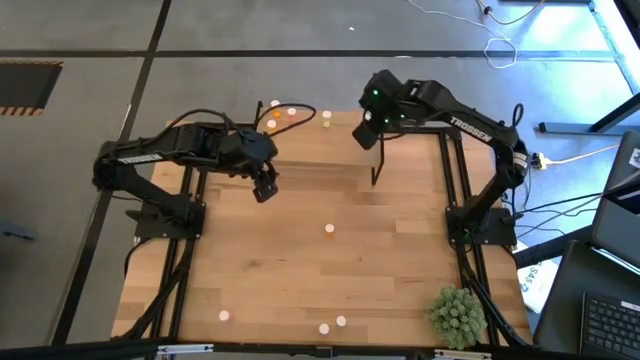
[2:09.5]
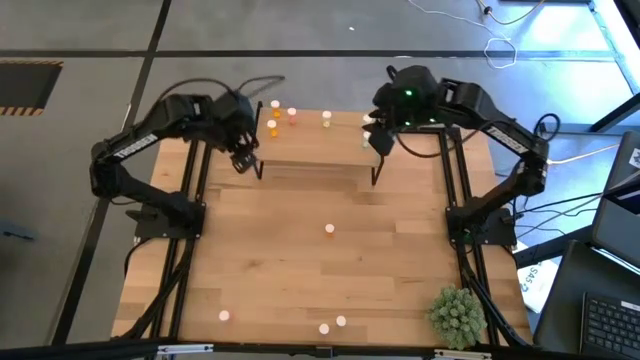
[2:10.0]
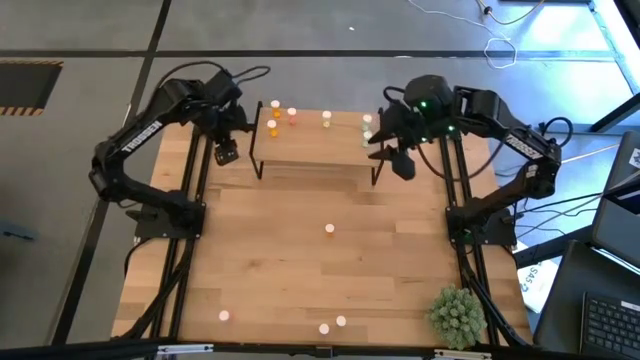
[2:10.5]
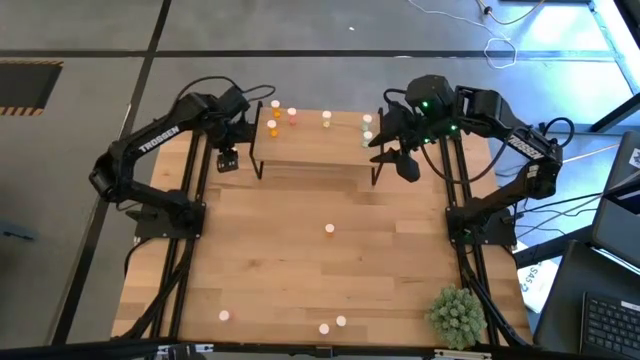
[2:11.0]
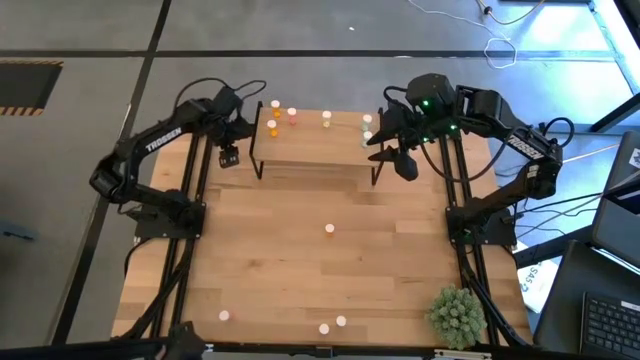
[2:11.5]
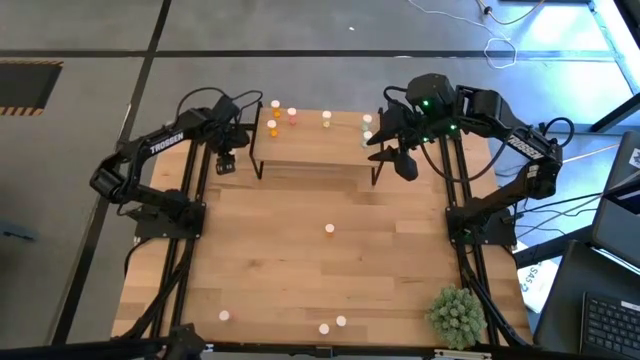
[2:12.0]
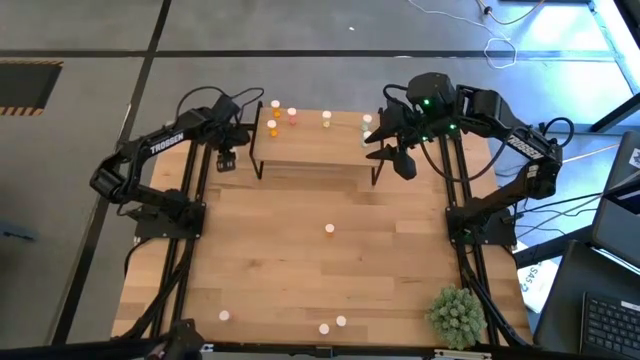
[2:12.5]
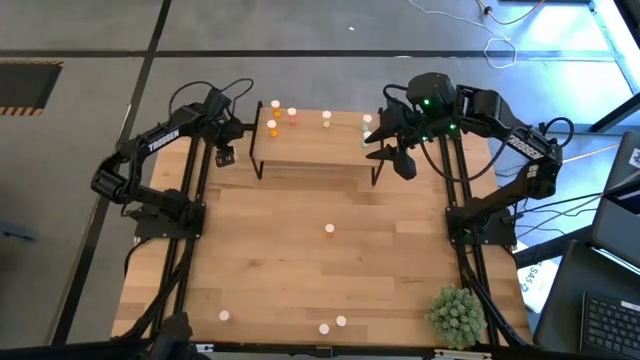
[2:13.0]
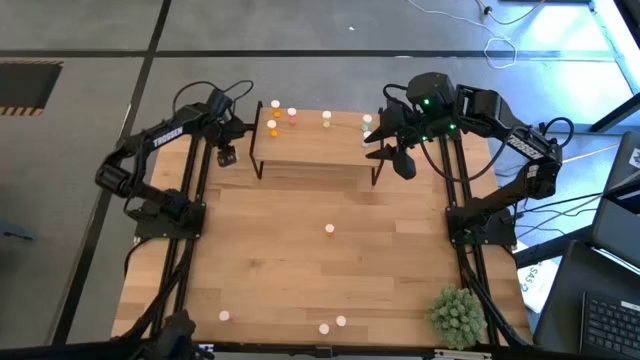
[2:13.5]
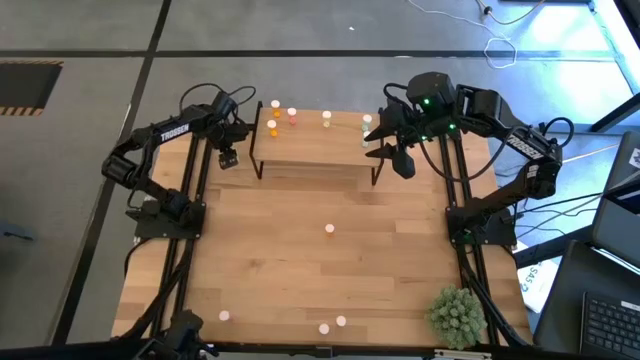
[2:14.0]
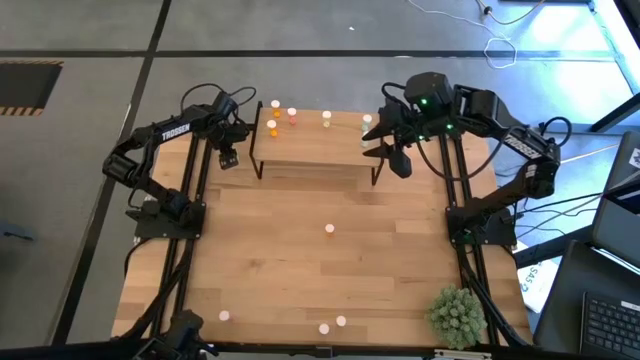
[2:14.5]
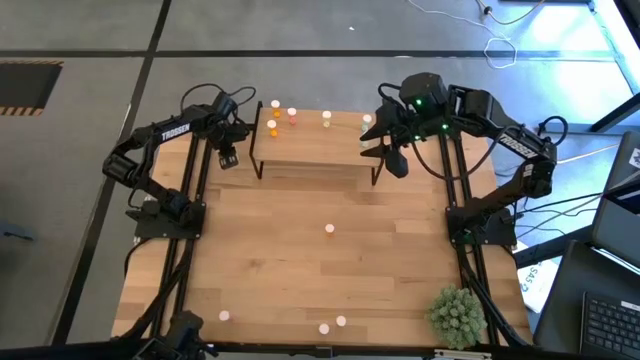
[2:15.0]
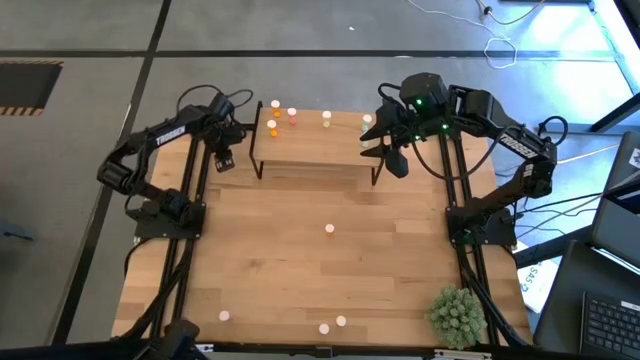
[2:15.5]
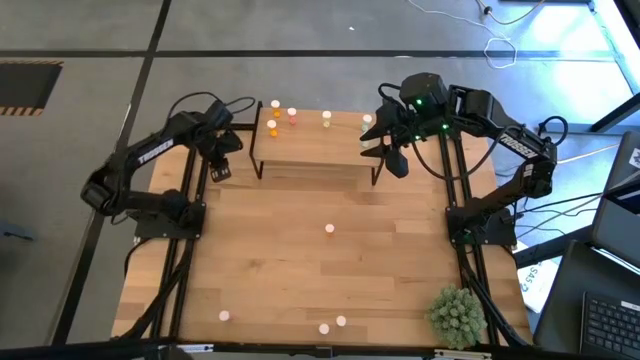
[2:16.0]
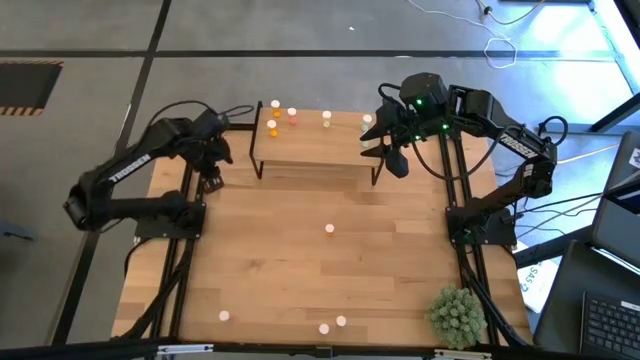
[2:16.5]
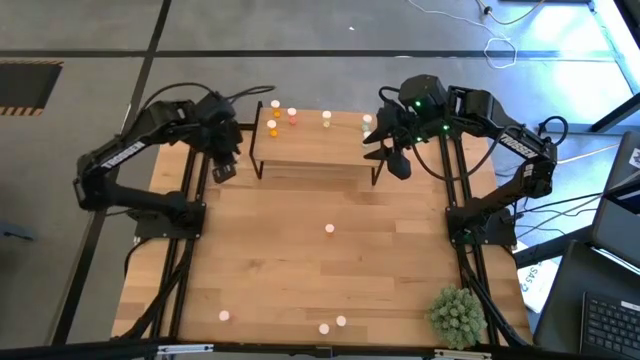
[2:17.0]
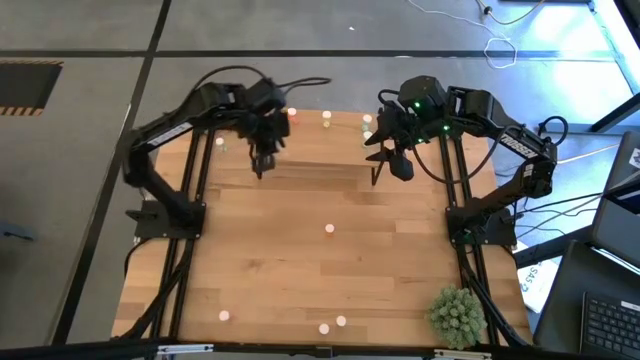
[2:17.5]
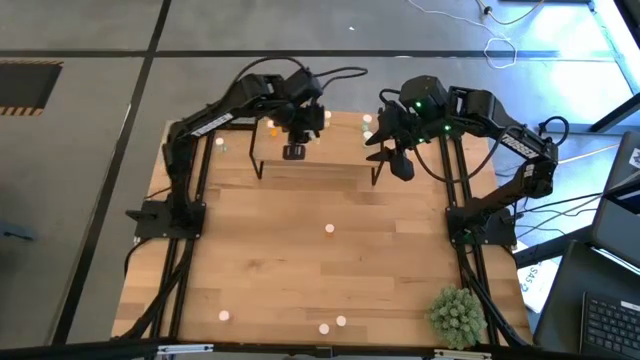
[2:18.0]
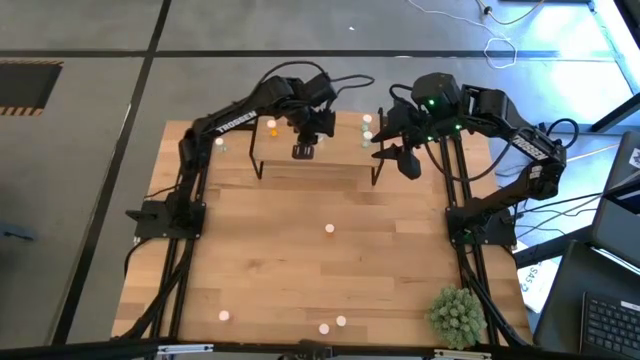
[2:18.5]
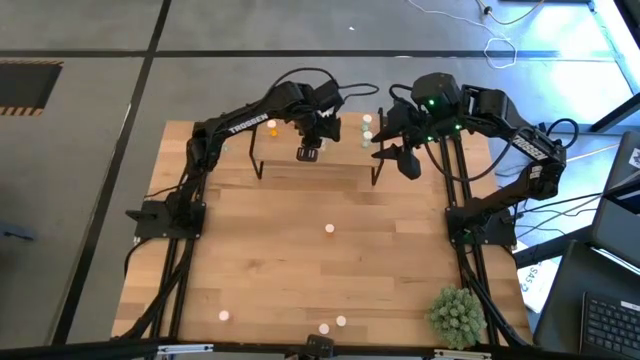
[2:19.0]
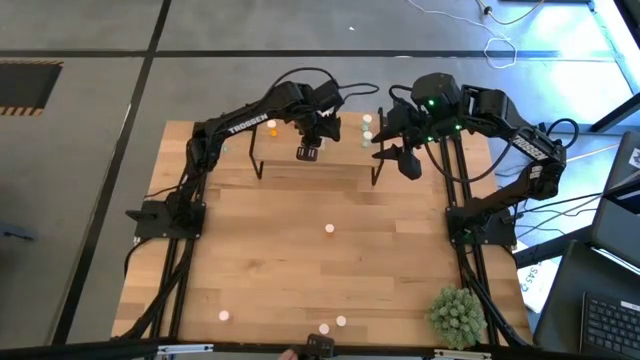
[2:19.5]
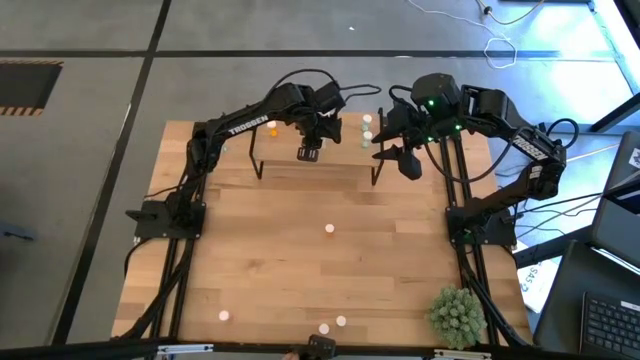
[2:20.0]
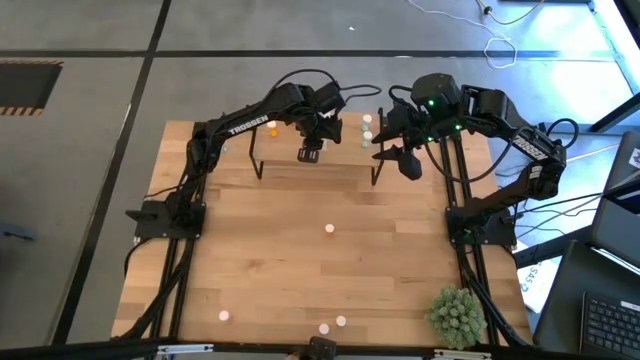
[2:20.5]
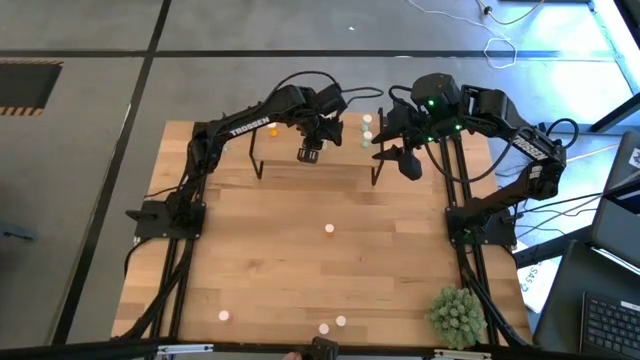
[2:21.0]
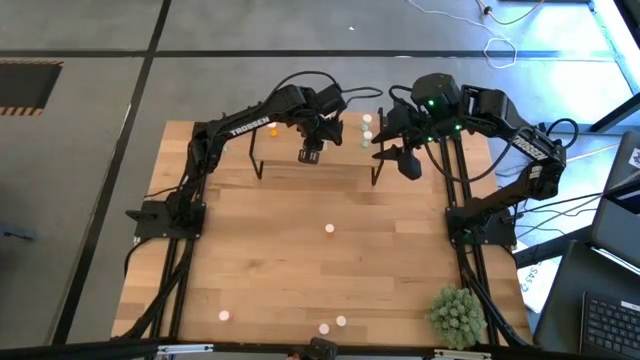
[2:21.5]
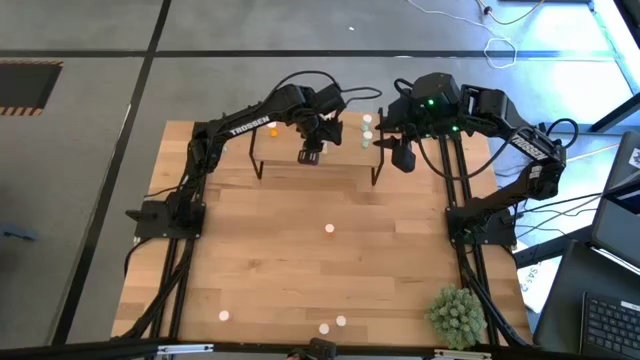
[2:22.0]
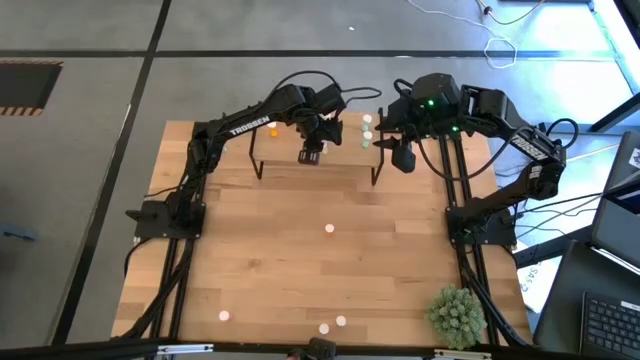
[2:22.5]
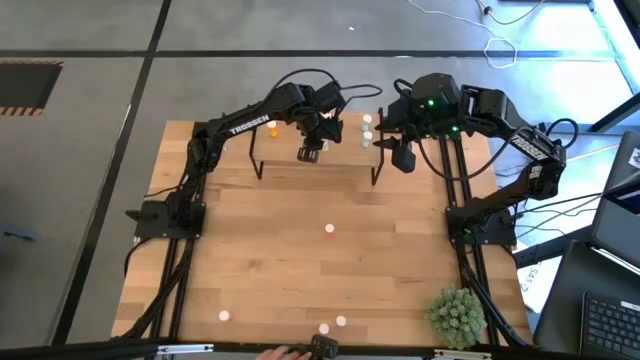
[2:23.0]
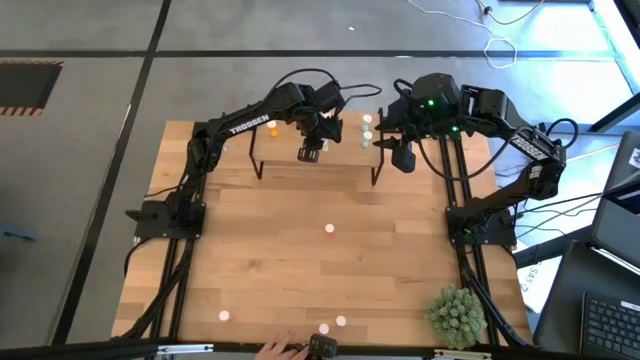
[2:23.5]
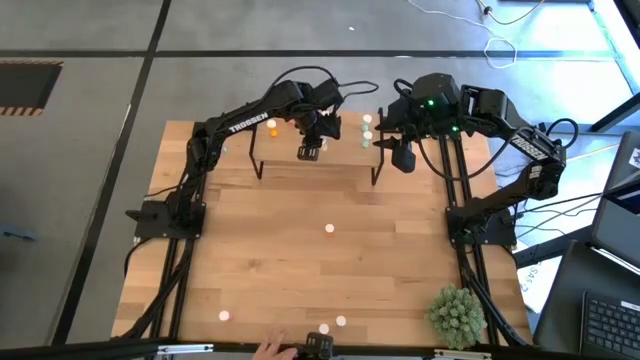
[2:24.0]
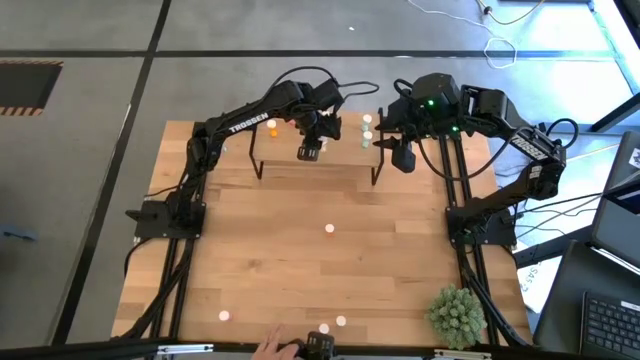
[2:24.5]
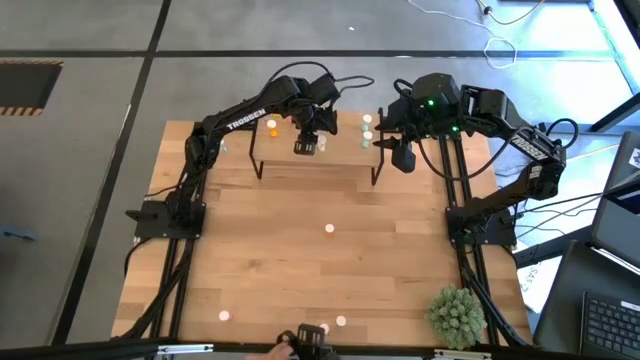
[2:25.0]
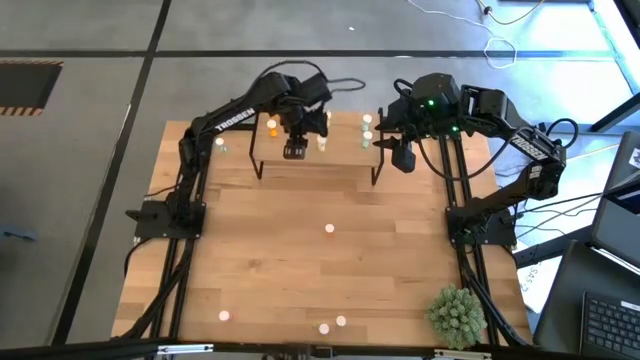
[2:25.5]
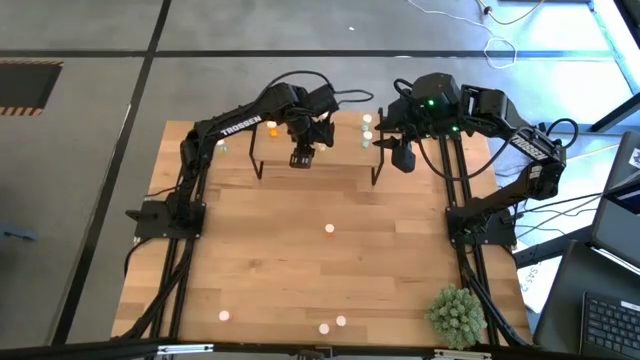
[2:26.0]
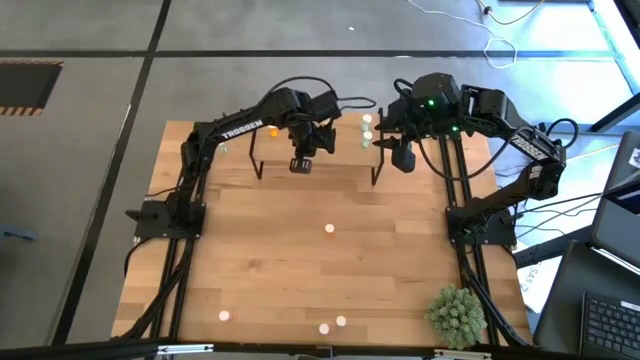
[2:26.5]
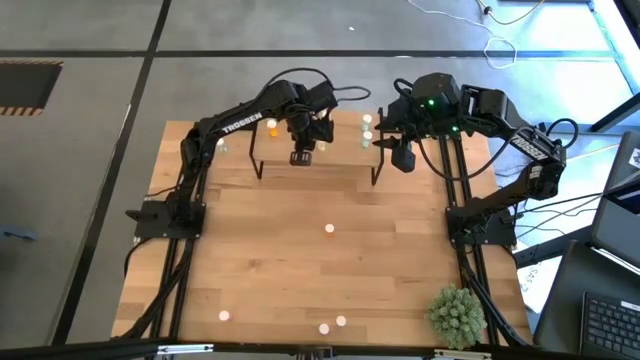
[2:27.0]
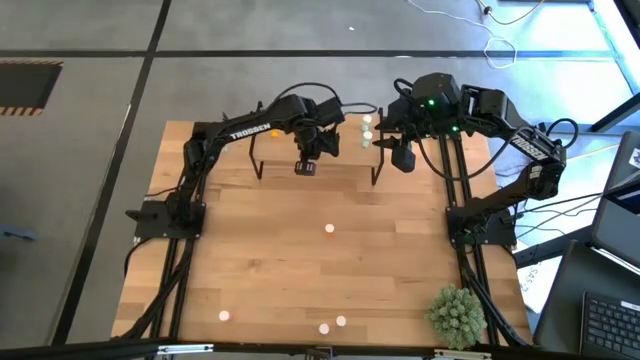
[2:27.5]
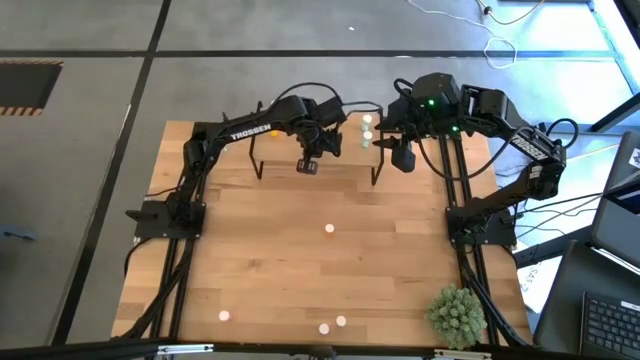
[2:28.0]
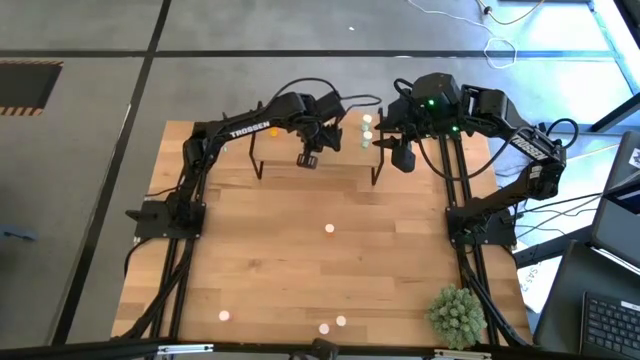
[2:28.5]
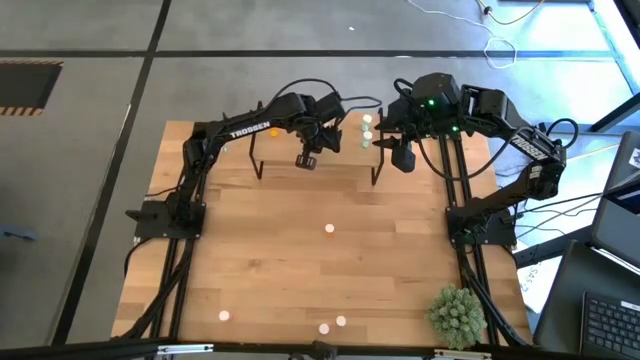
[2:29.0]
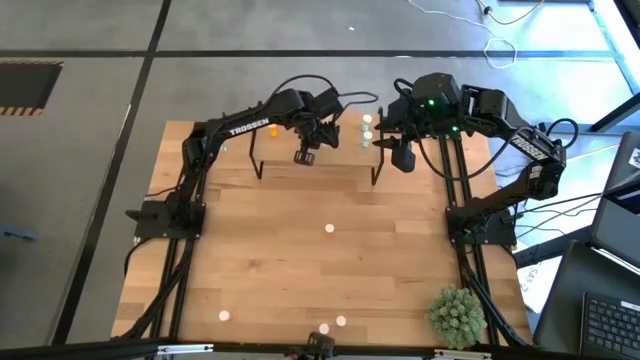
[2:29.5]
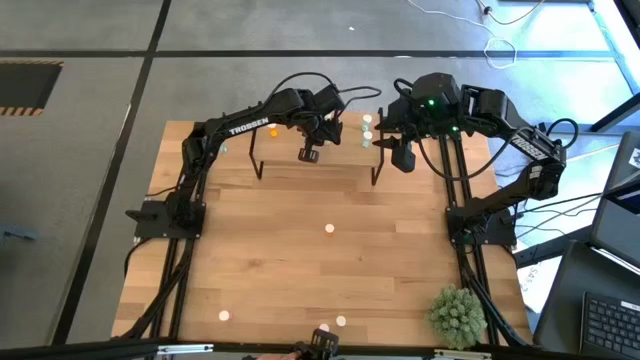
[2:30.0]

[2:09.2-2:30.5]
Task: Pick and place medicine bottles onto shelf by color
Put the top yellow pill bottle on the shelf aligned with the other yellow pill bottle
